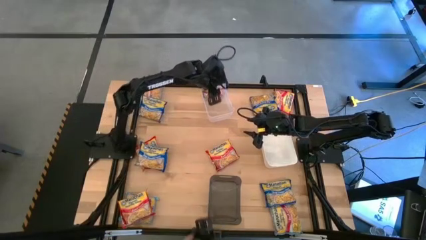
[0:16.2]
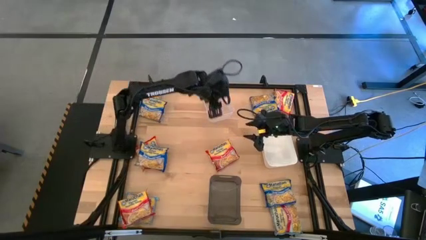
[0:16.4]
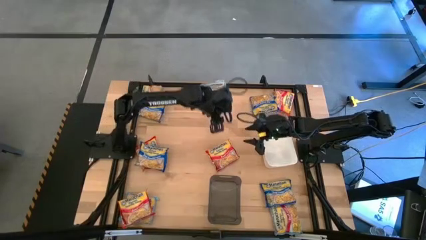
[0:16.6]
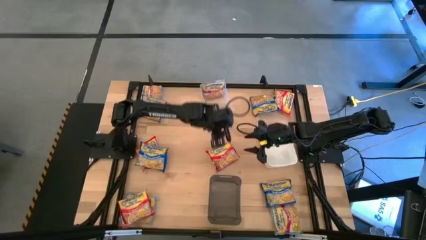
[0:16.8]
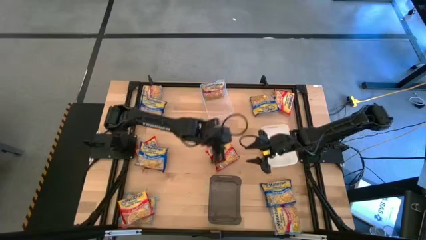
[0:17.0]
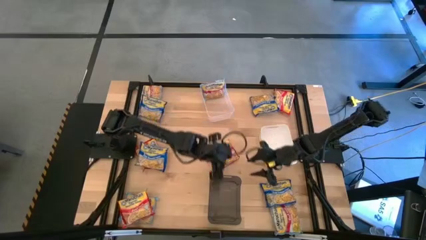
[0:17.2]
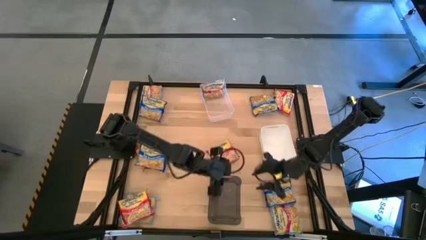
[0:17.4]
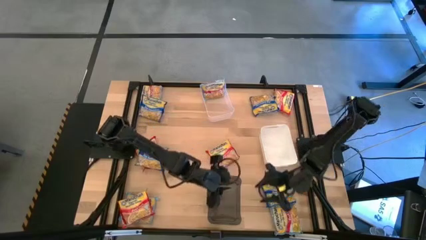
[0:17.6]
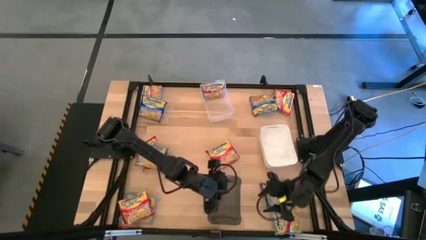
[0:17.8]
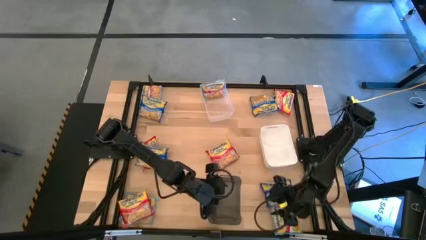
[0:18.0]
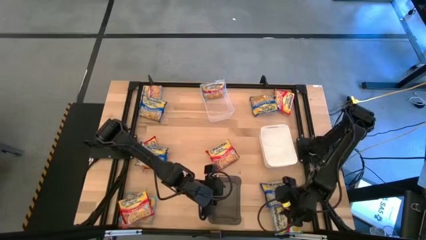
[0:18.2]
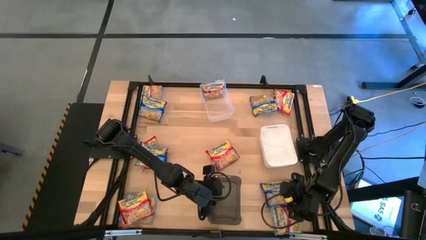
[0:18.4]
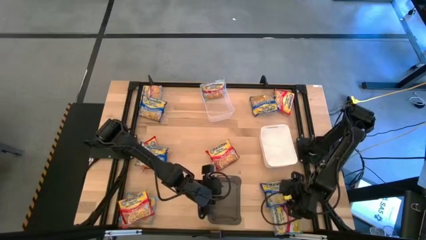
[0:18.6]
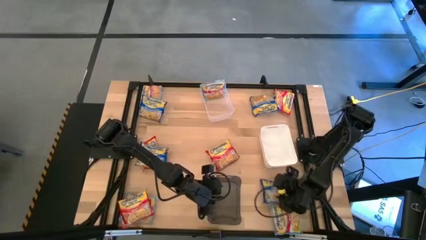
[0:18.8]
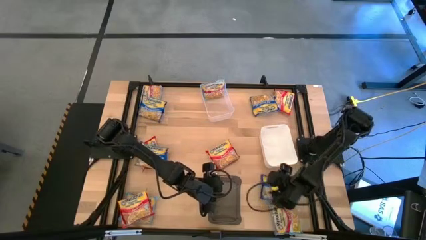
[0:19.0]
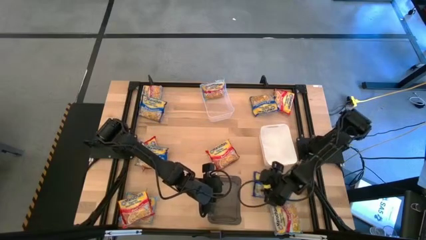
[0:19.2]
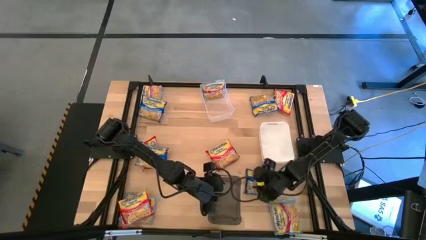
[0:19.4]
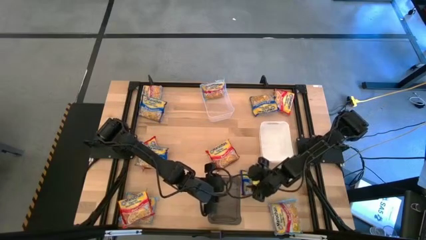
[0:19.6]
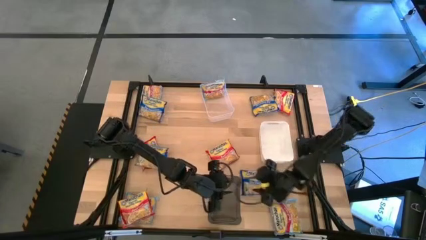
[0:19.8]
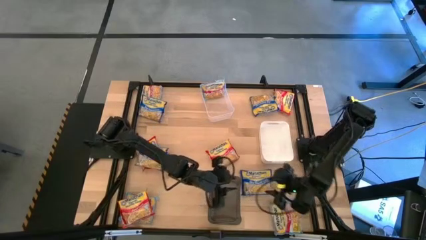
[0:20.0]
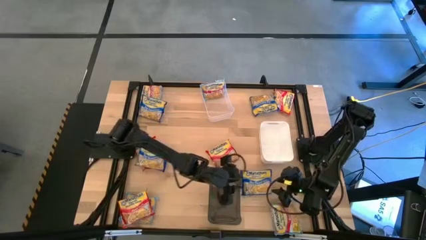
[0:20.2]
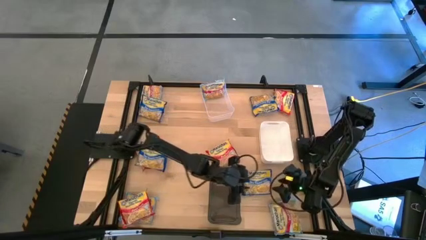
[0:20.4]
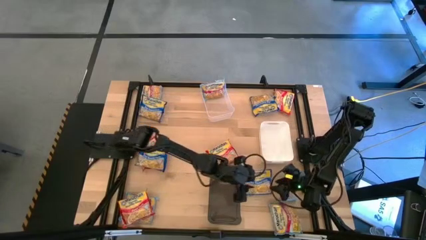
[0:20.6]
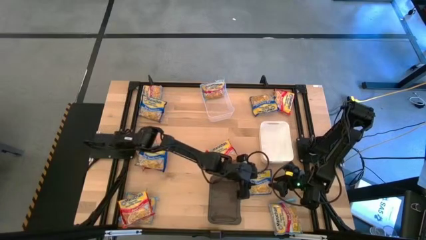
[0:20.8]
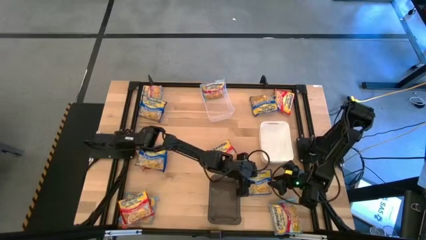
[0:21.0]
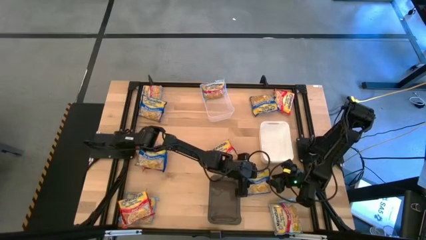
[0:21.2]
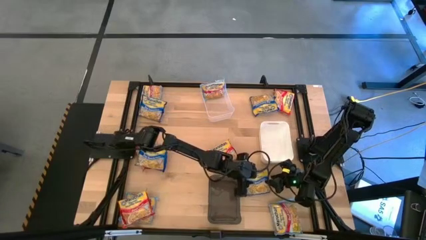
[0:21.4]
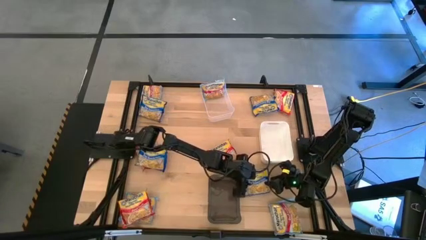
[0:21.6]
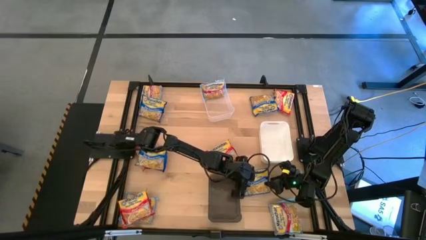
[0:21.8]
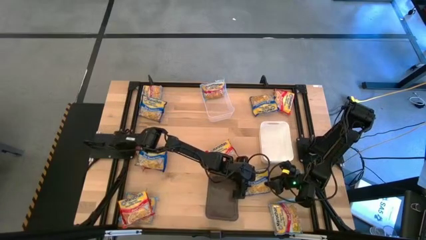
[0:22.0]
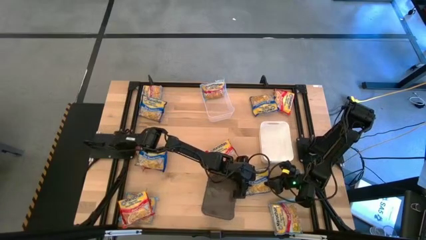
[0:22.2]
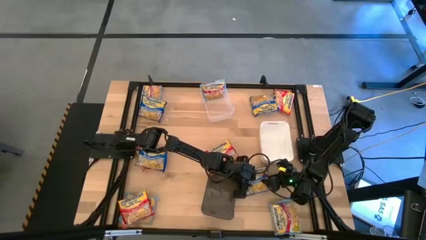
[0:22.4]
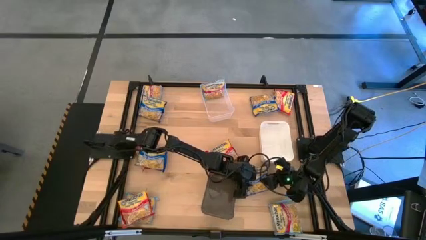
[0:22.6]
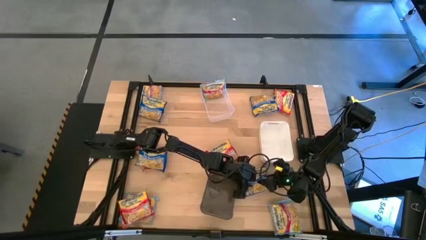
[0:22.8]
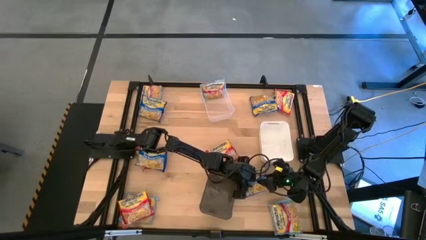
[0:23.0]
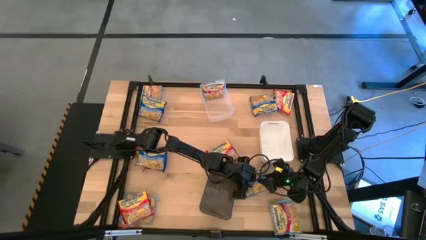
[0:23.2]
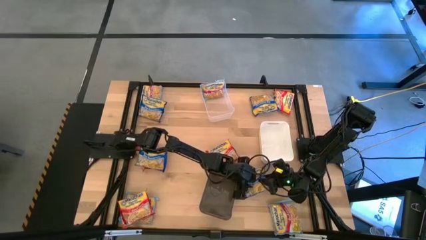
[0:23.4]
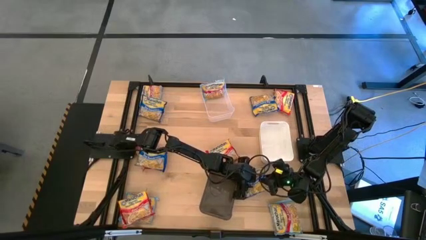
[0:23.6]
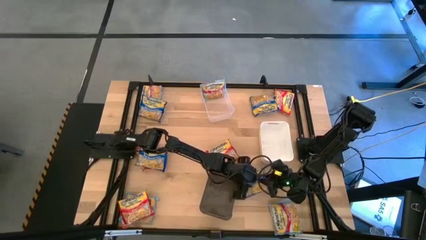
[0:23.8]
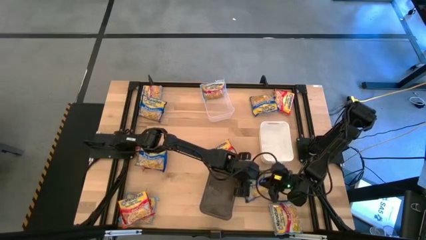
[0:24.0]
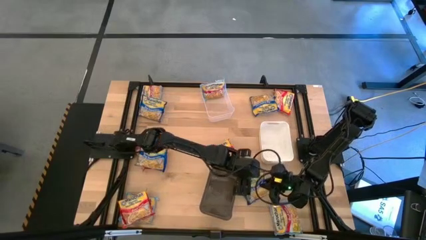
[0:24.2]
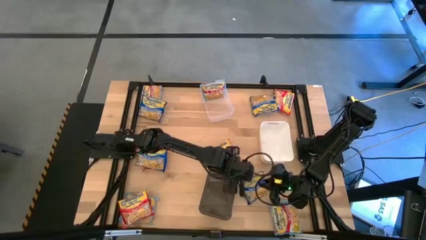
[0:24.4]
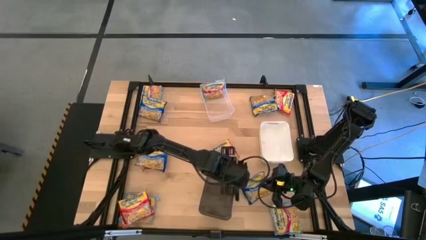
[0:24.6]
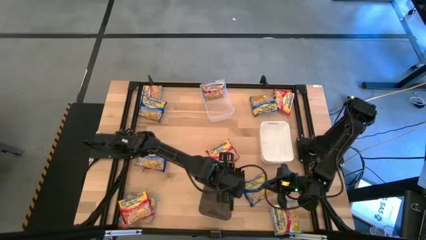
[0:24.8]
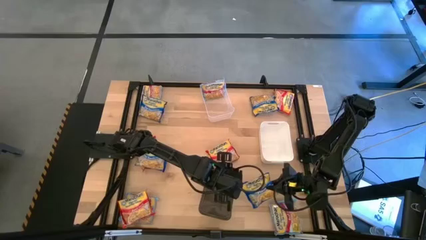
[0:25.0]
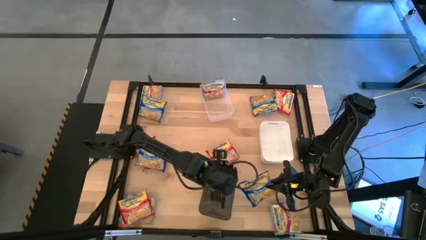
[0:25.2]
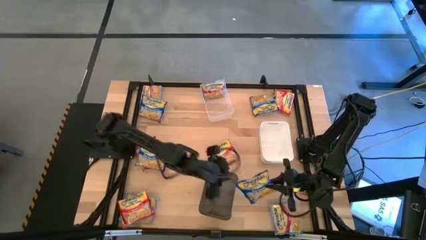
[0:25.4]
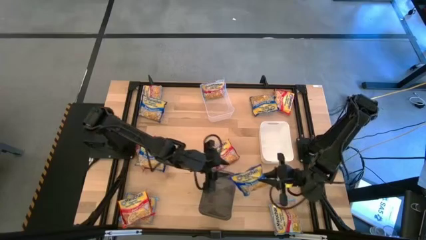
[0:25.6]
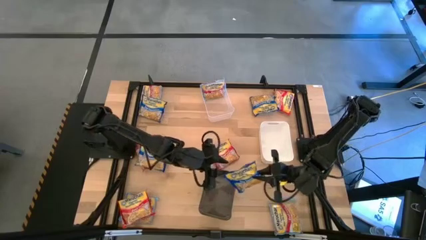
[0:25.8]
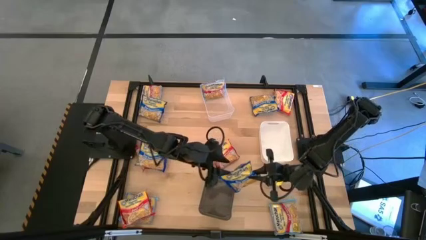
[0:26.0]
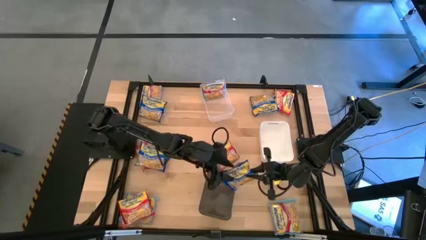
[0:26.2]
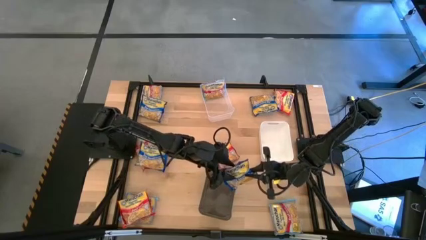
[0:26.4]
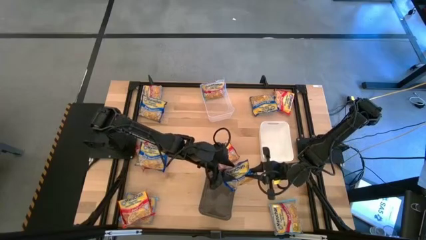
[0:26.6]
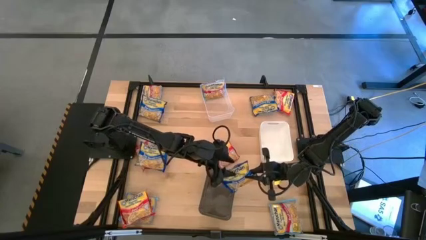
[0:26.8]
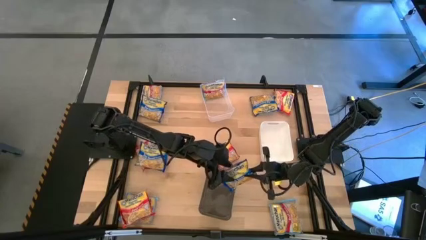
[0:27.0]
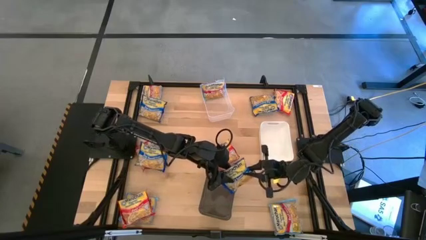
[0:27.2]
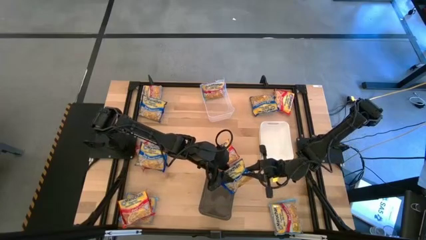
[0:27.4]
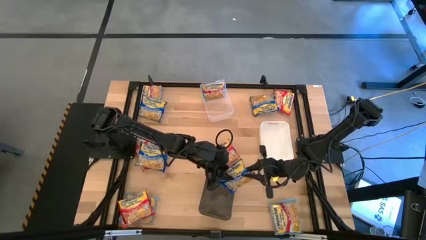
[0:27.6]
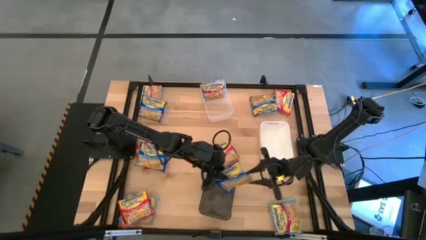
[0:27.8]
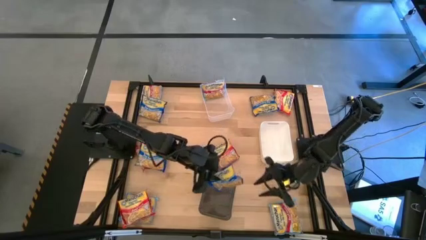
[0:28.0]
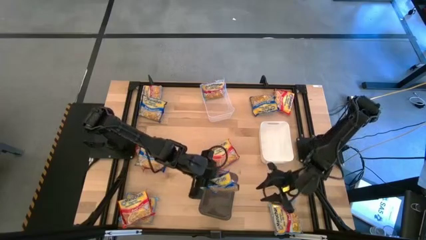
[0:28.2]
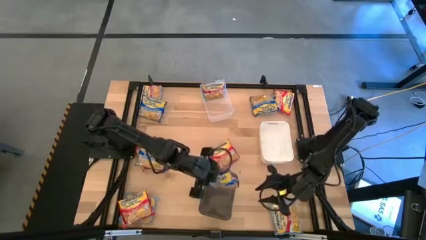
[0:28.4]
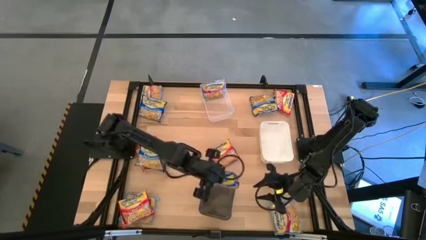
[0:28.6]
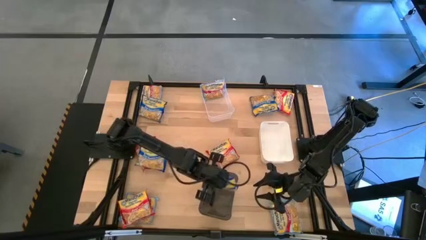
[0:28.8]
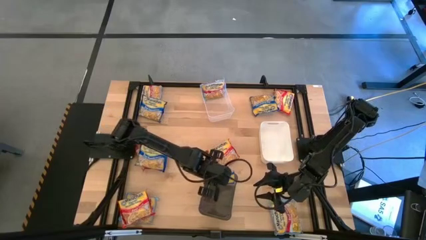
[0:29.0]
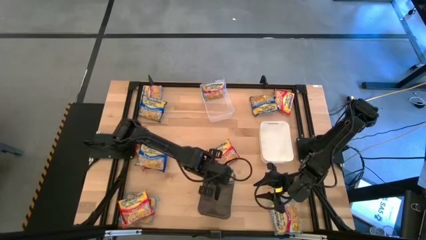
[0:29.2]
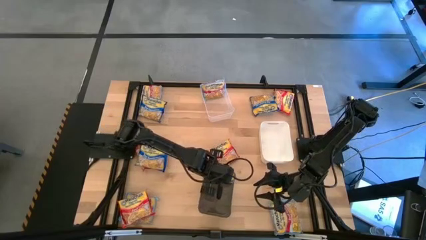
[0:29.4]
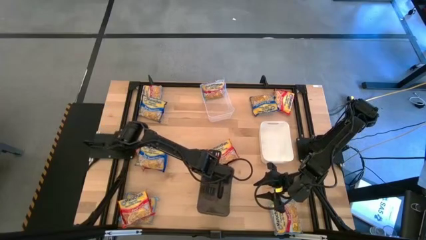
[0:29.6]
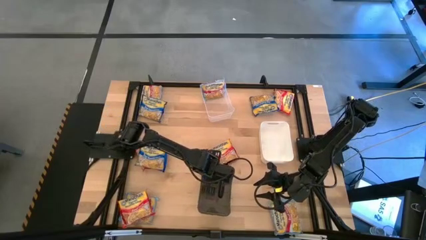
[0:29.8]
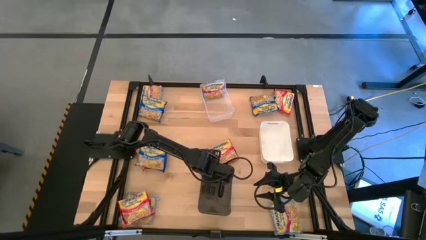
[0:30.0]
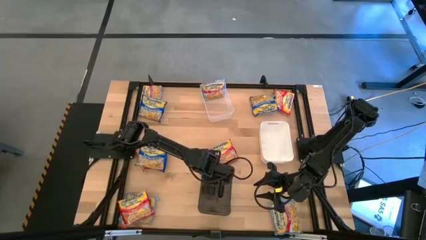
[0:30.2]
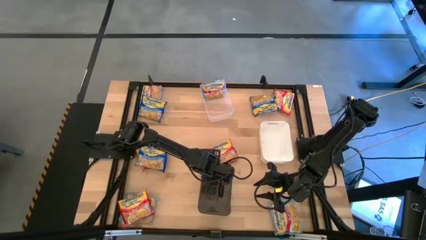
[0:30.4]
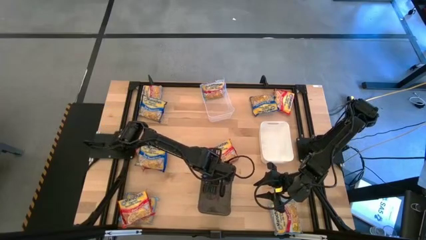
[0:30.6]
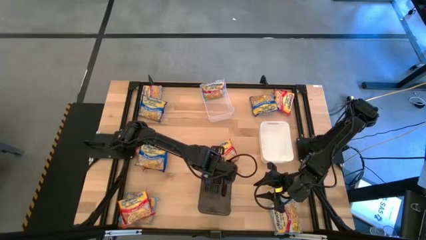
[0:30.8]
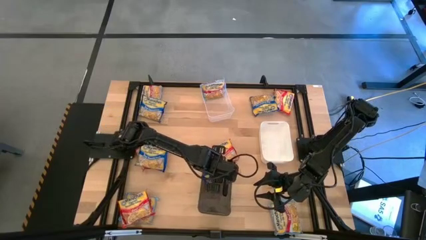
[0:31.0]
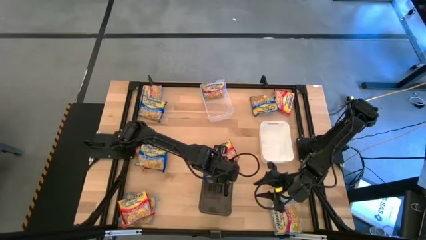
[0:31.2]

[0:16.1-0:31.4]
Task: Sort Maruchan noodles
Put the bottom right blue noodle pack into the black bin
